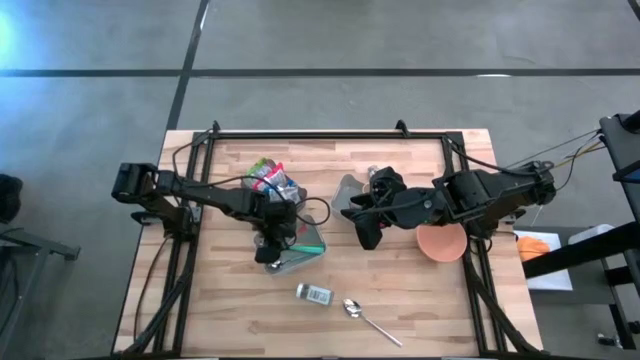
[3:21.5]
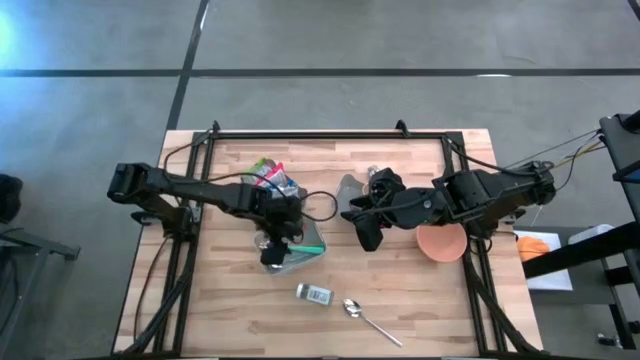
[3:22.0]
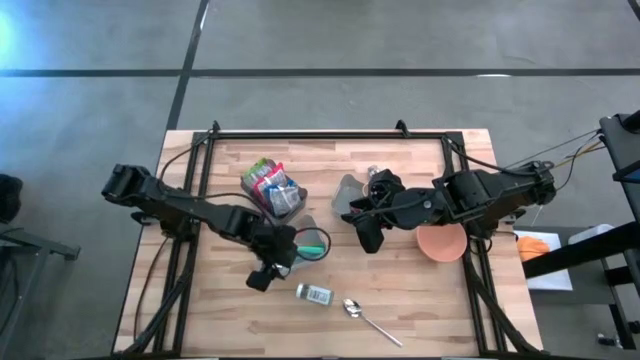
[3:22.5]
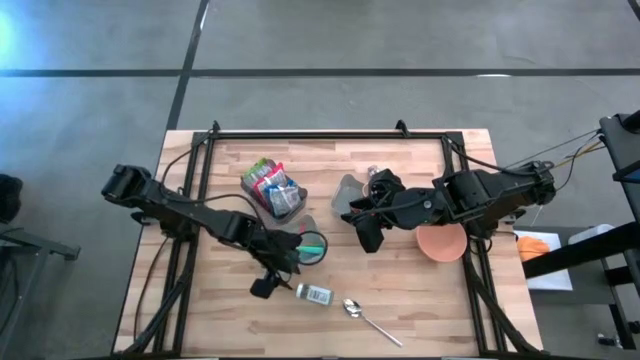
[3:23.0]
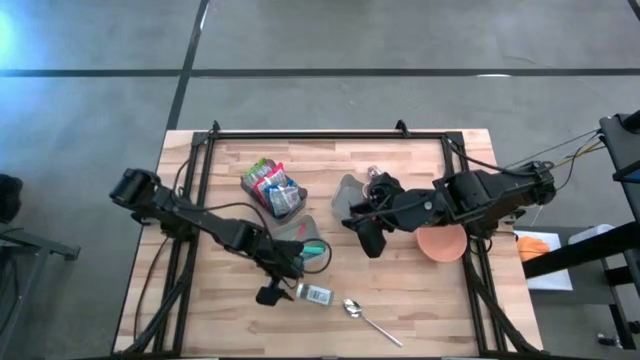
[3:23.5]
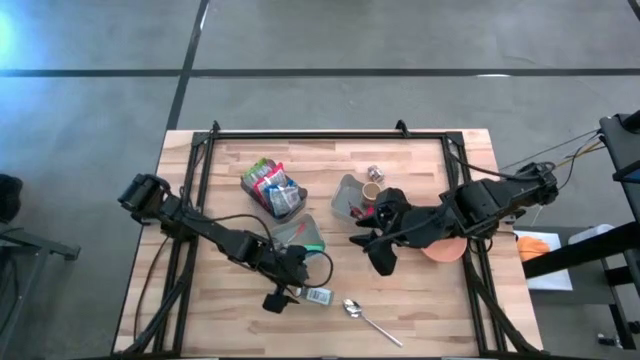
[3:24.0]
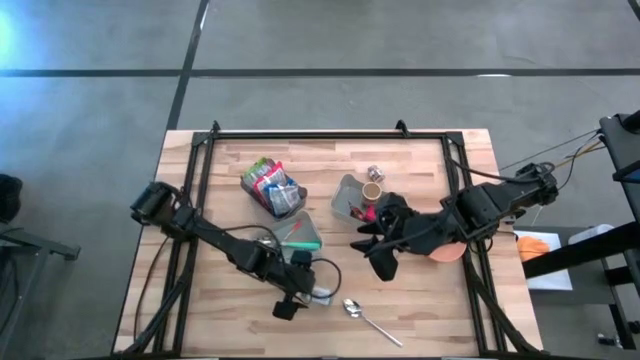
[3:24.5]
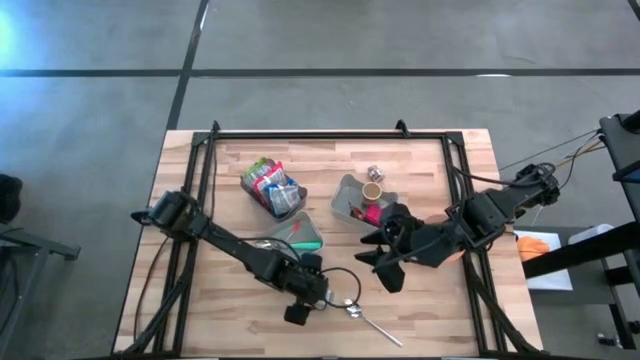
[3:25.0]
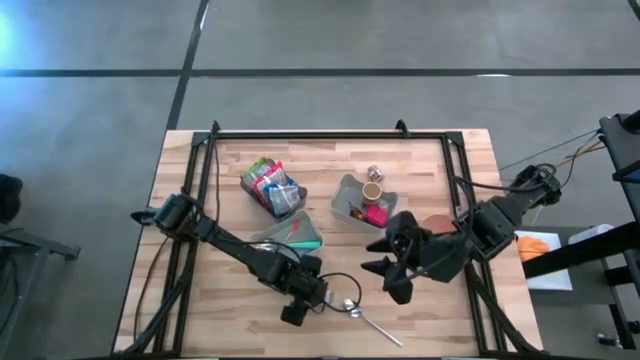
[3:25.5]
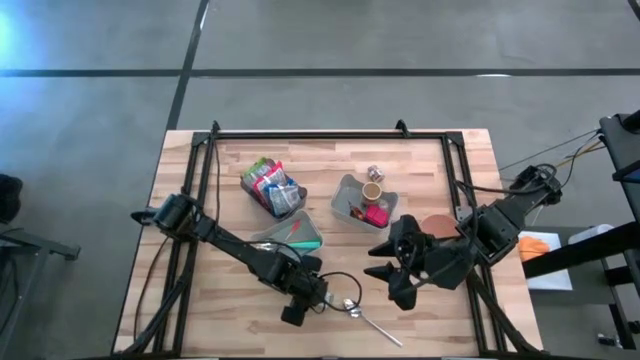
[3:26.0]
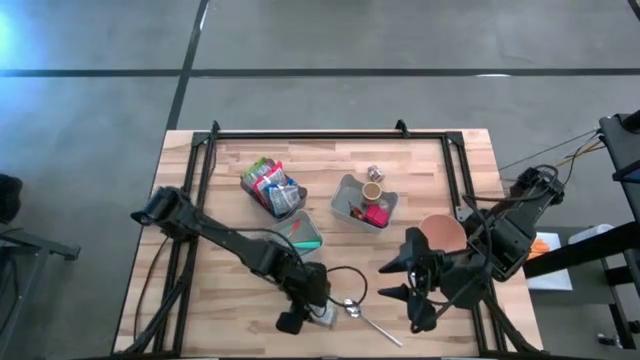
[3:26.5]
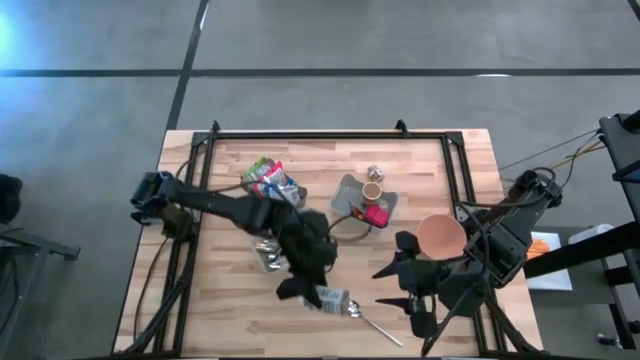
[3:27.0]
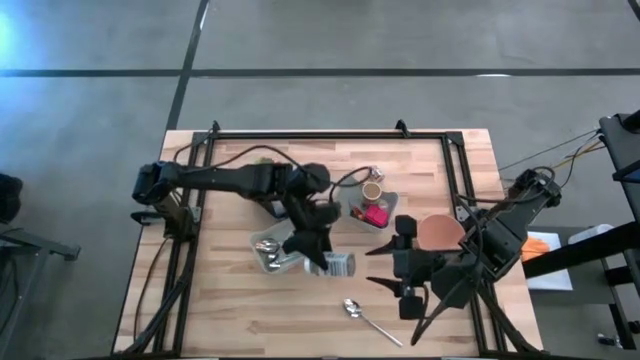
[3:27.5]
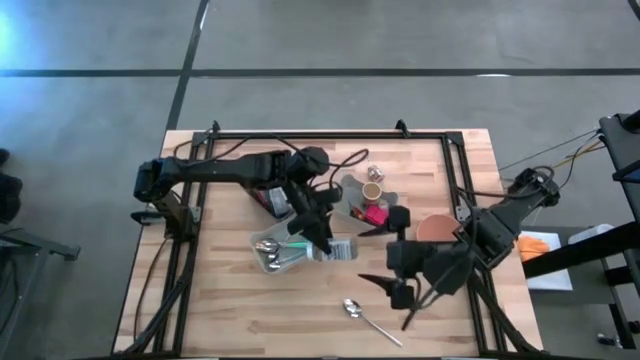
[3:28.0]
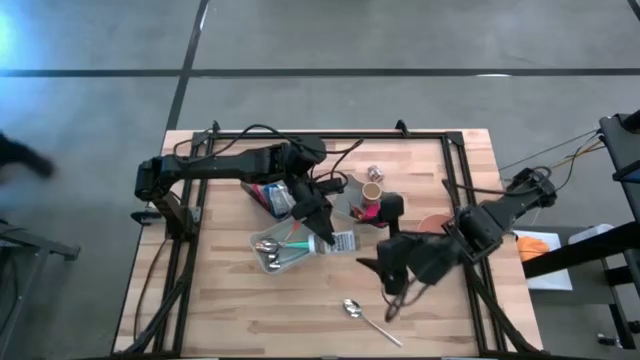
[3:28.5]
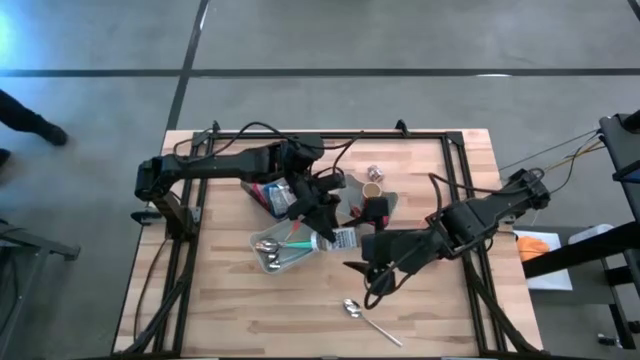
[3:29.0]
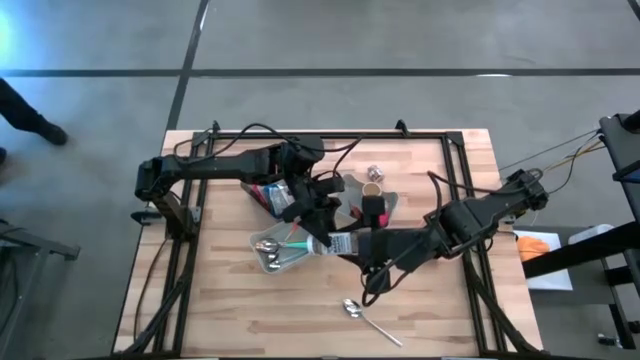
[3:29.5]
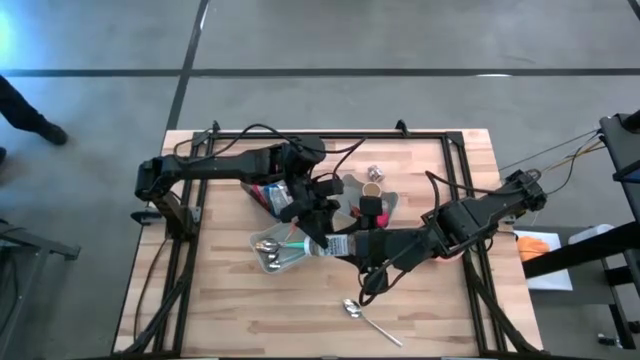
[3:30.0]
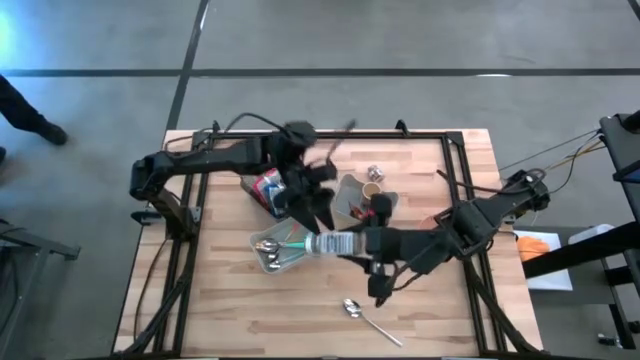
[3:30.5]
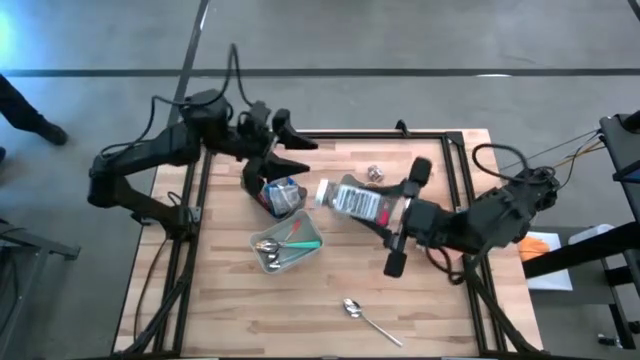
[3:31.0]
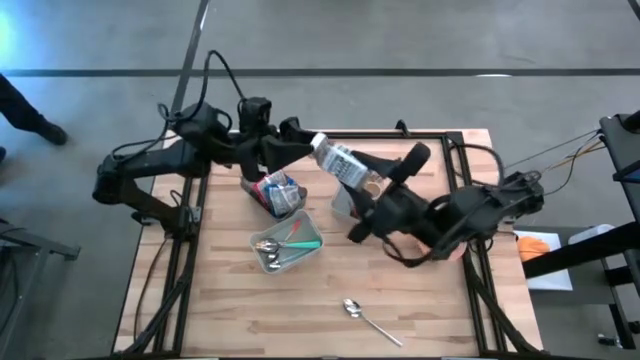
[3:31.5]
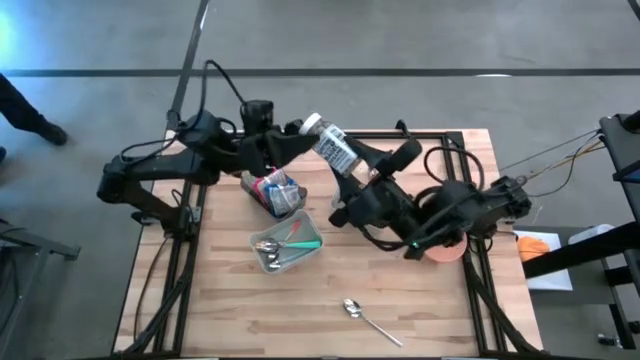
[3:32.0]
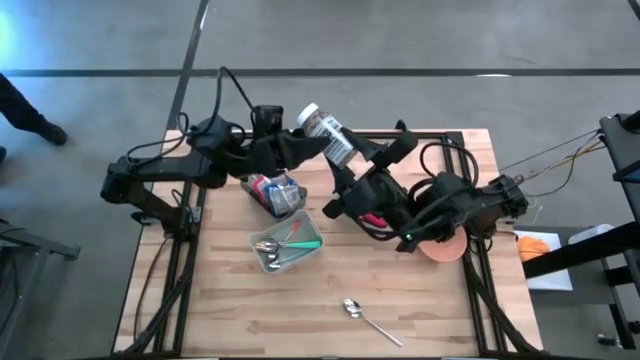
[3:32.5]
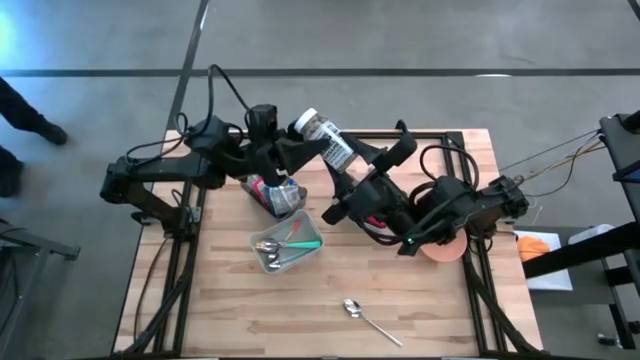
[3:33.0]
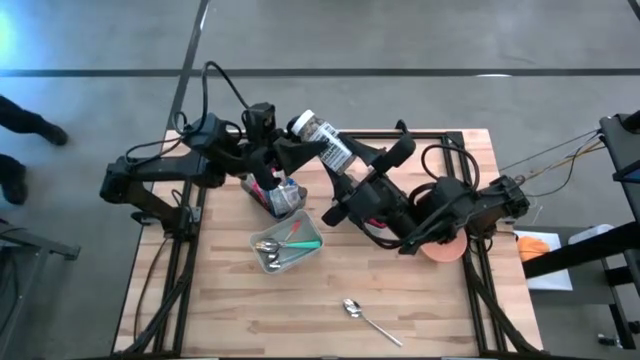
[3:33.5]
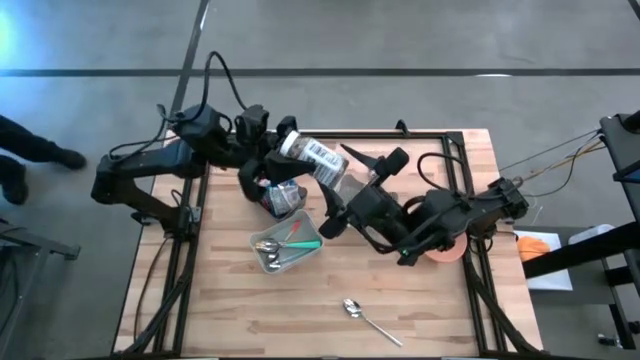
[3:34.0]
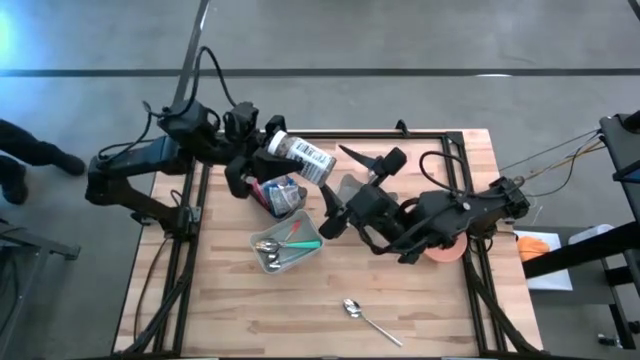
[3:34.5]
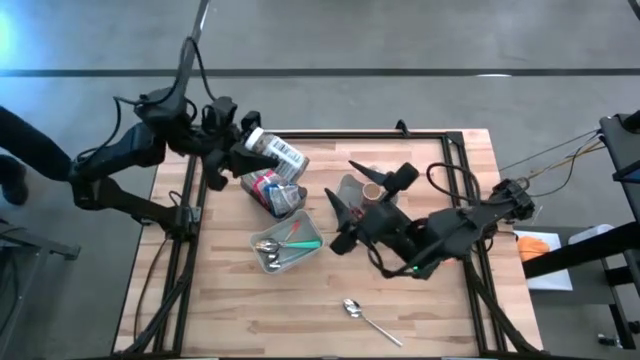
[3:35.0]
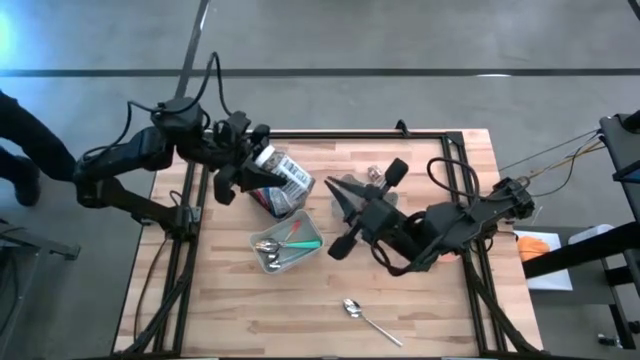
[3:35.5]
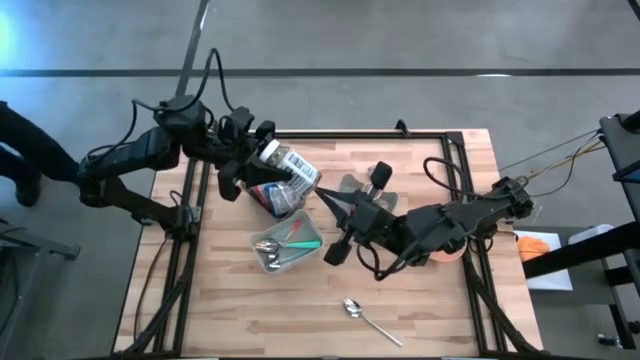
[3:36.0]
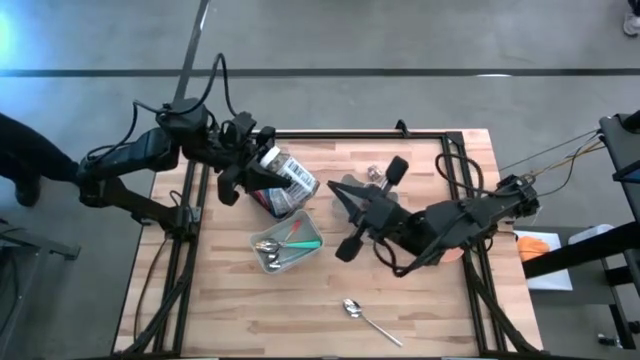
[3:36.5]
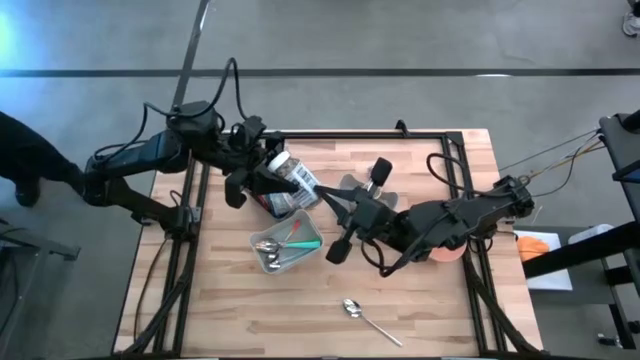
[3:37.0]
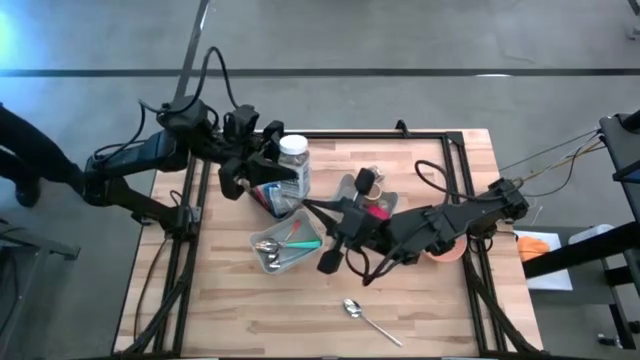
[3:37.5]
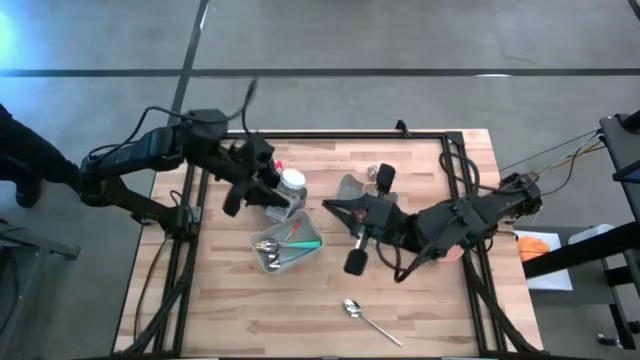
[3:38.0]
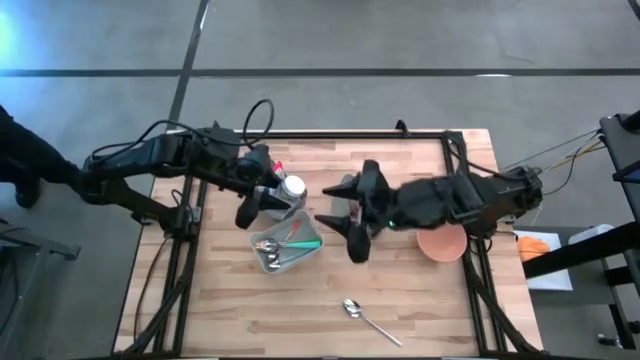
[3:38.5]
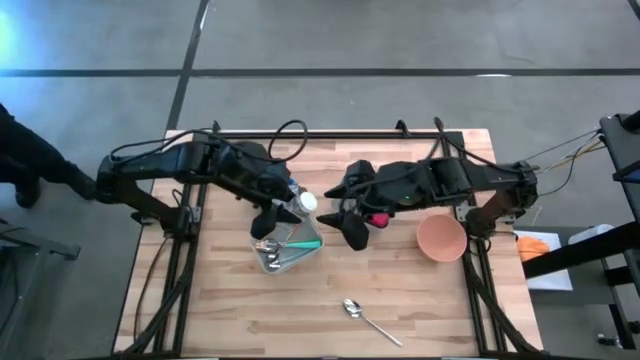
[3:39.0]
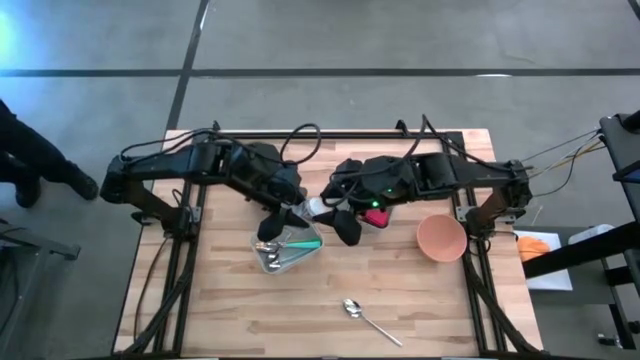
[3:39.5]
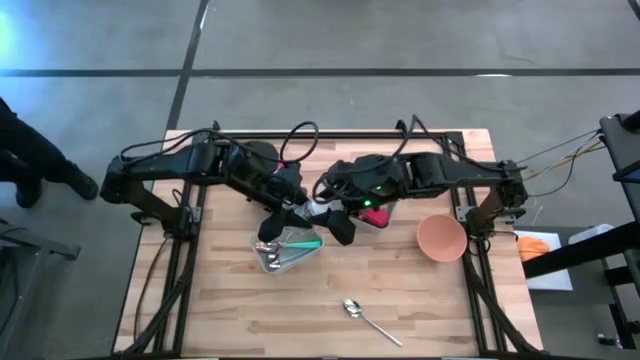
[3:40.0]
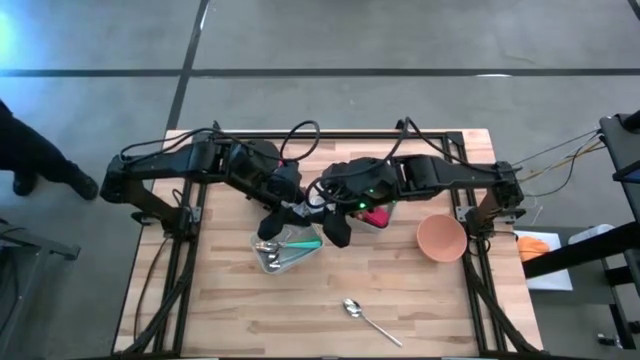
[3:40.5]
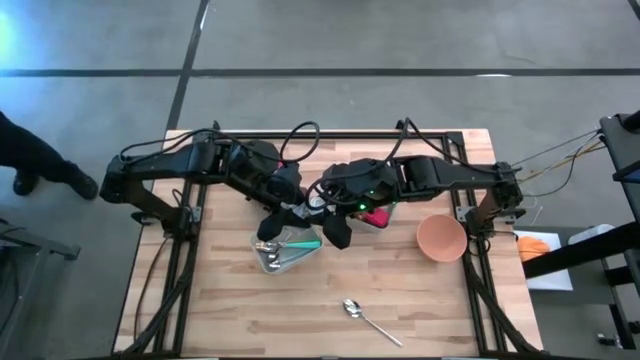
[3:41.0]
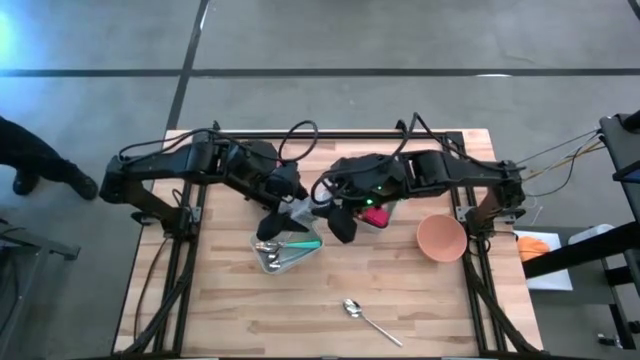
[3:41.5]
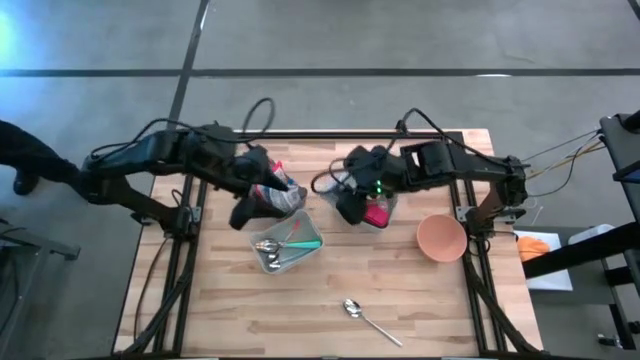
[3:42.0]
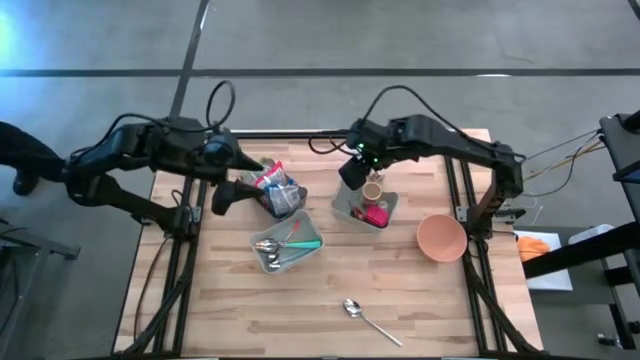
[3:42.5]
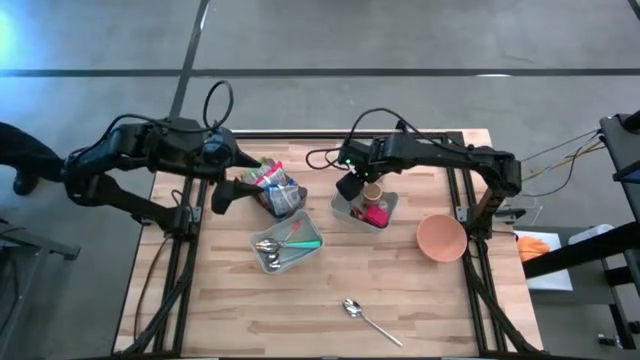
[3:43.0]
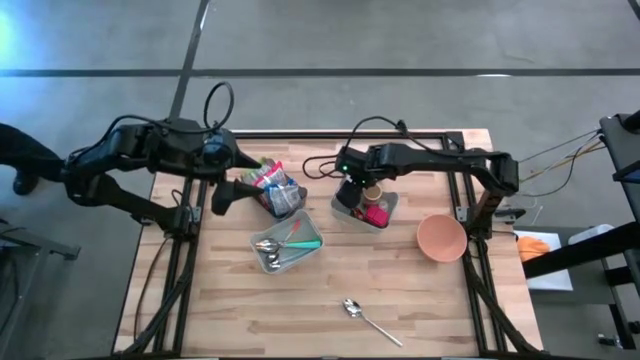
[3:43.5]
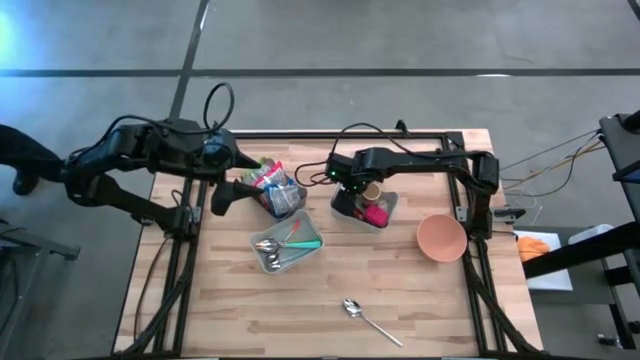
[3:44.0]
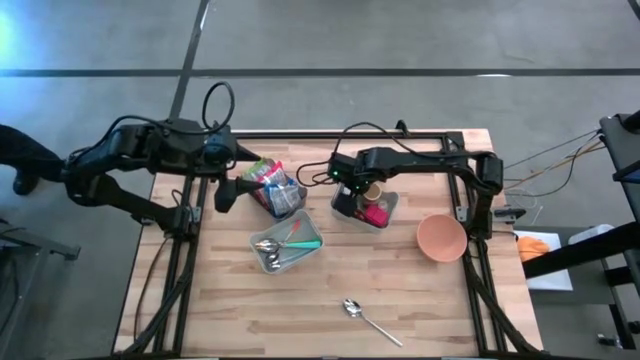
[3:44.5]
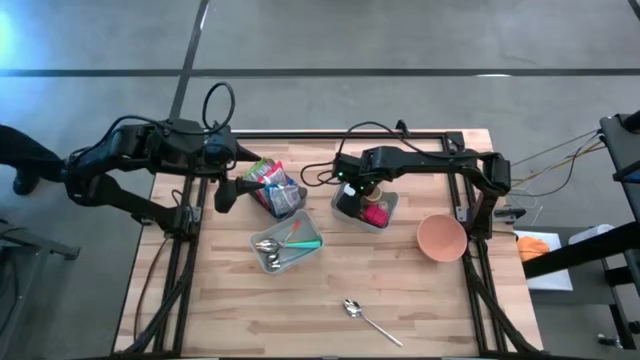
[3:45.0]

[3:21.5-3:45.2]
Put the white seasoning bottle into the top gray bin
